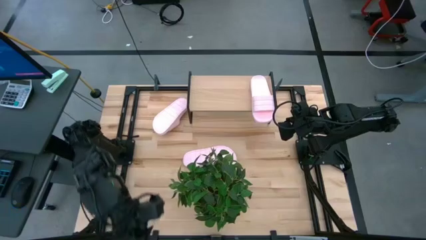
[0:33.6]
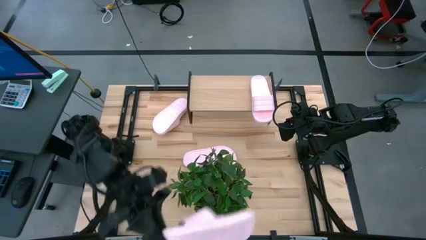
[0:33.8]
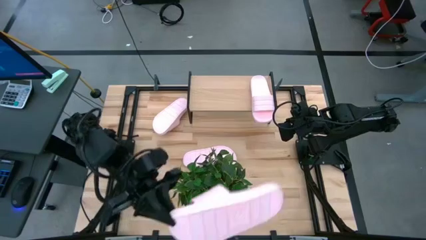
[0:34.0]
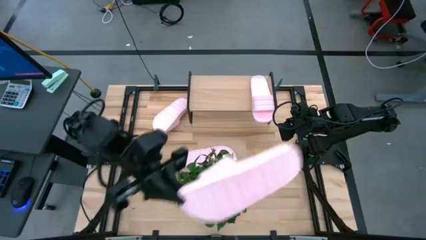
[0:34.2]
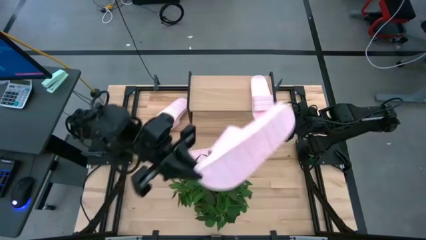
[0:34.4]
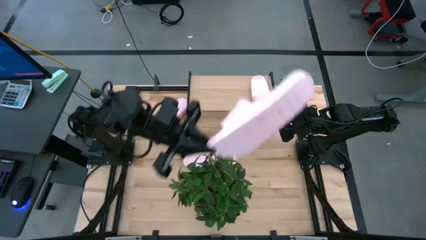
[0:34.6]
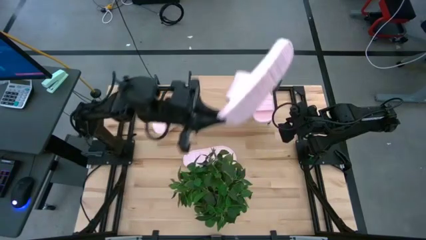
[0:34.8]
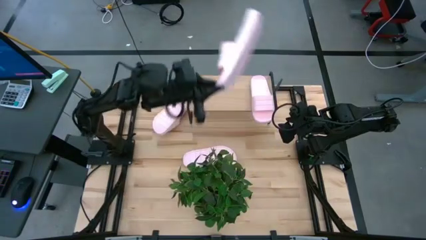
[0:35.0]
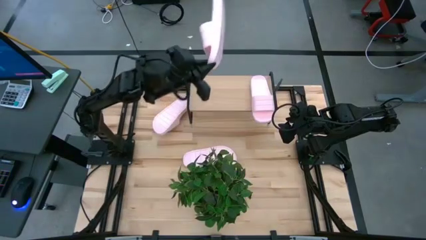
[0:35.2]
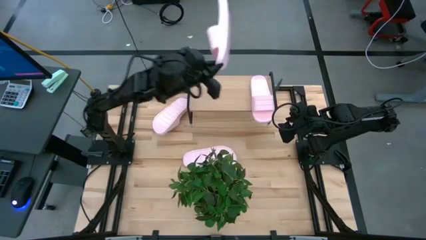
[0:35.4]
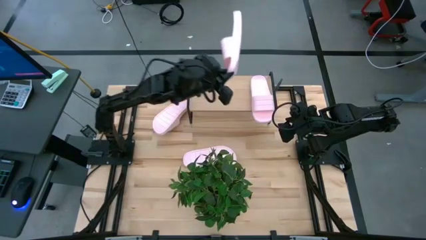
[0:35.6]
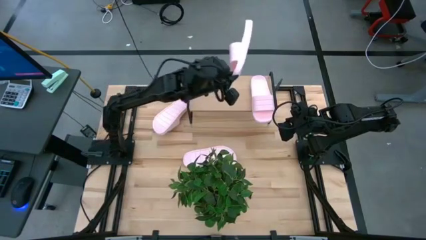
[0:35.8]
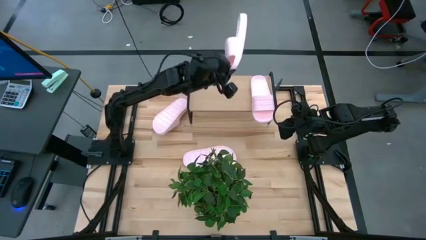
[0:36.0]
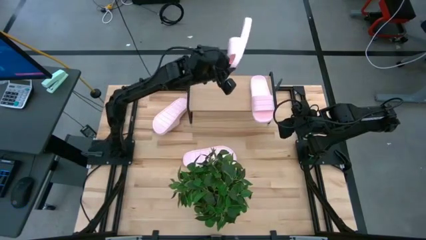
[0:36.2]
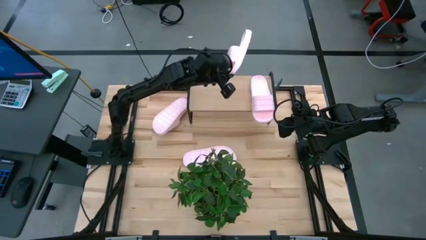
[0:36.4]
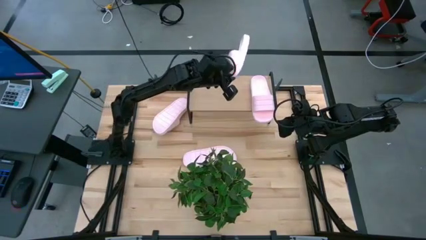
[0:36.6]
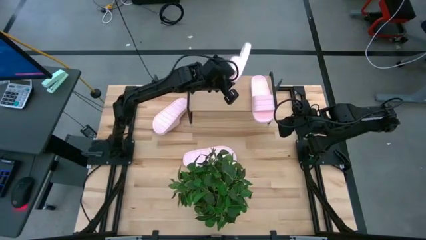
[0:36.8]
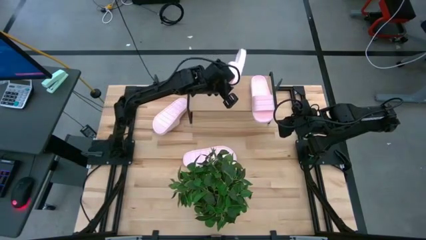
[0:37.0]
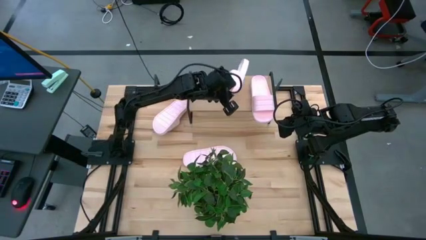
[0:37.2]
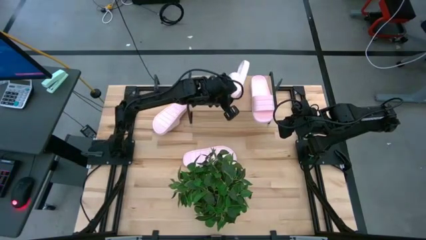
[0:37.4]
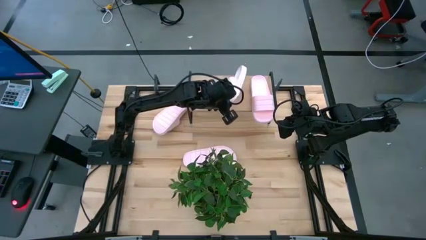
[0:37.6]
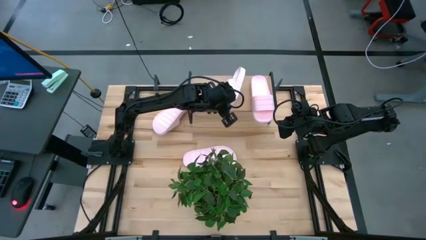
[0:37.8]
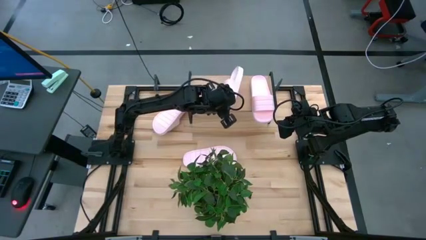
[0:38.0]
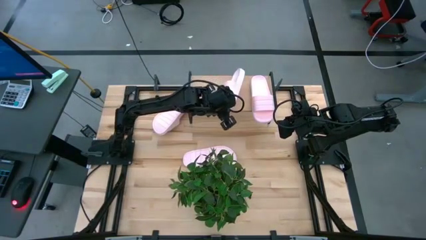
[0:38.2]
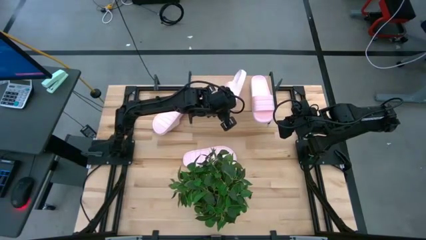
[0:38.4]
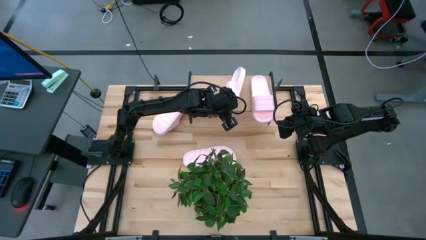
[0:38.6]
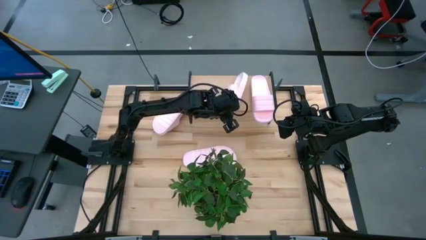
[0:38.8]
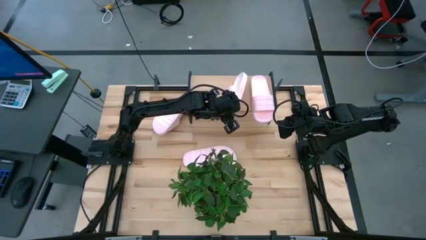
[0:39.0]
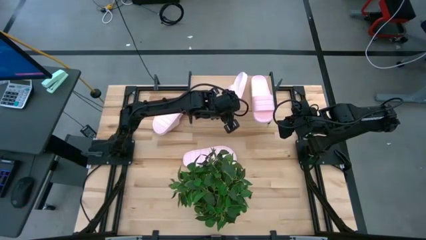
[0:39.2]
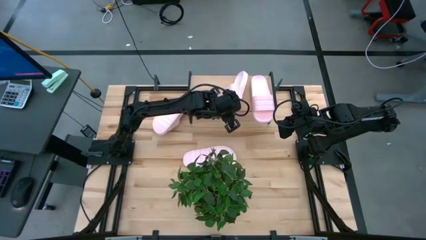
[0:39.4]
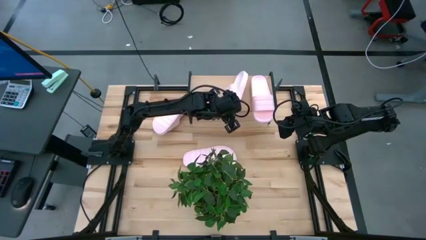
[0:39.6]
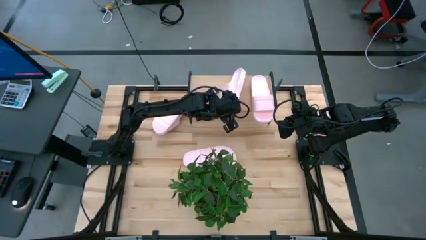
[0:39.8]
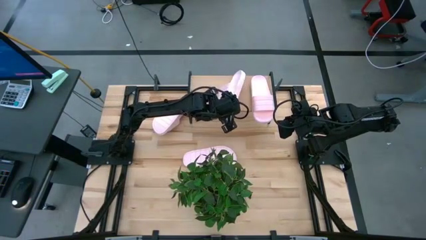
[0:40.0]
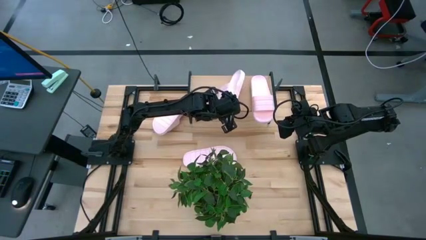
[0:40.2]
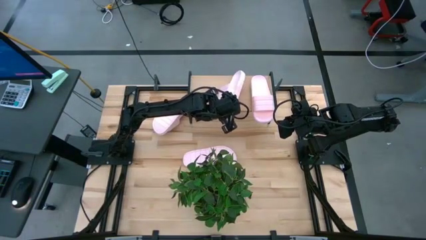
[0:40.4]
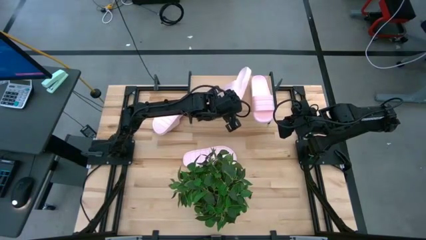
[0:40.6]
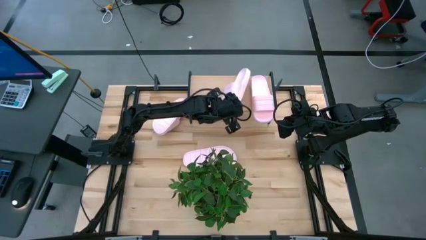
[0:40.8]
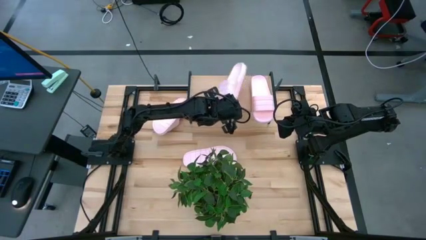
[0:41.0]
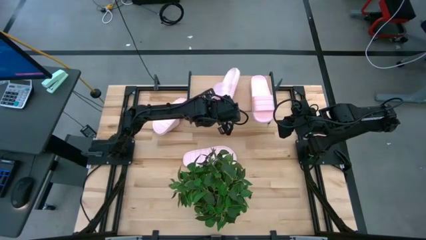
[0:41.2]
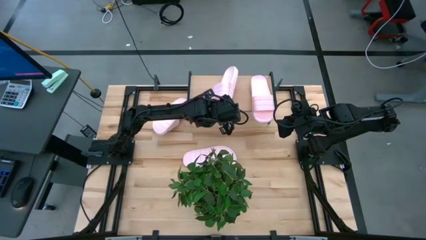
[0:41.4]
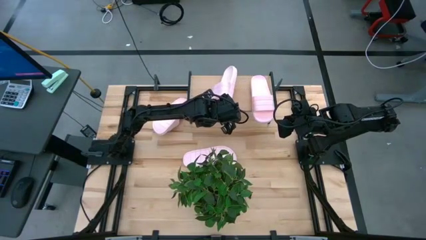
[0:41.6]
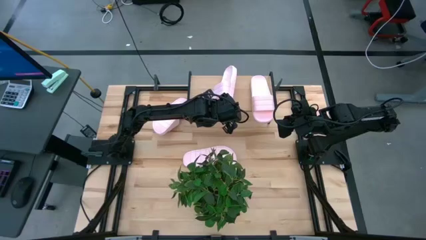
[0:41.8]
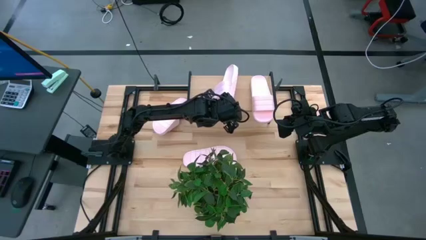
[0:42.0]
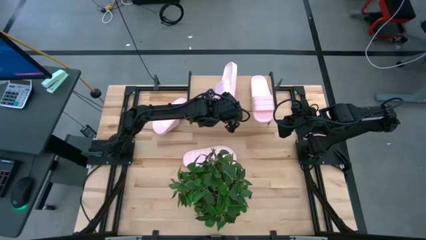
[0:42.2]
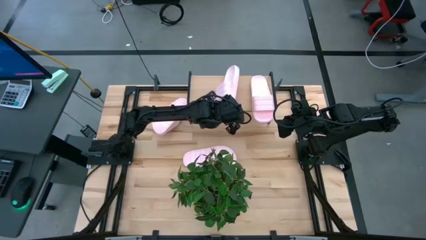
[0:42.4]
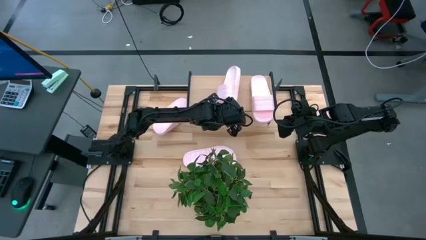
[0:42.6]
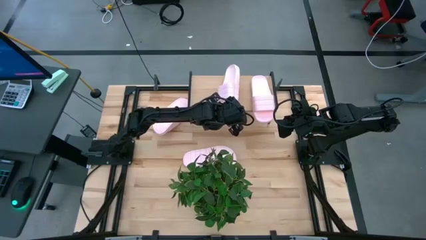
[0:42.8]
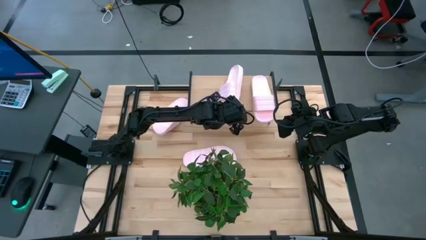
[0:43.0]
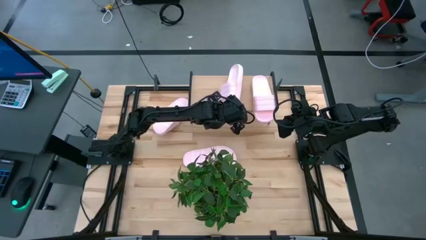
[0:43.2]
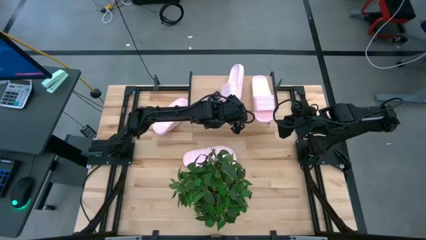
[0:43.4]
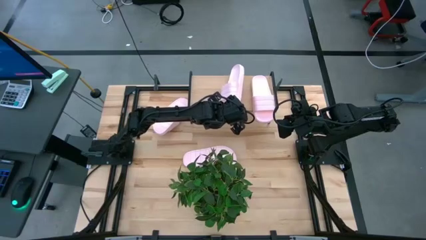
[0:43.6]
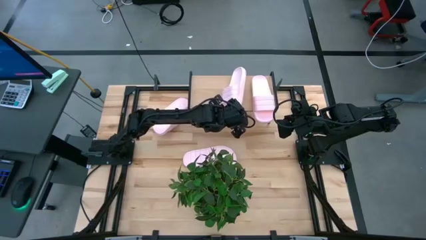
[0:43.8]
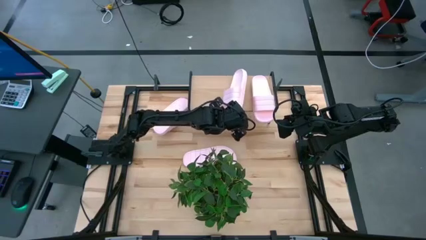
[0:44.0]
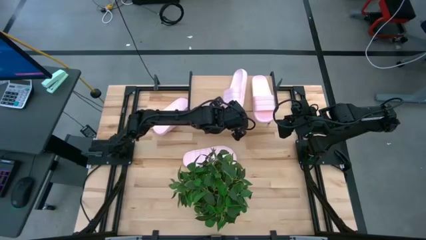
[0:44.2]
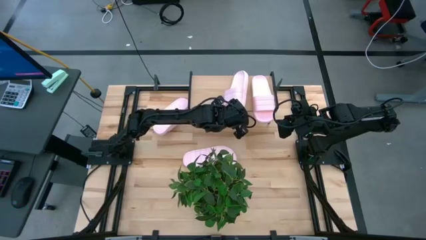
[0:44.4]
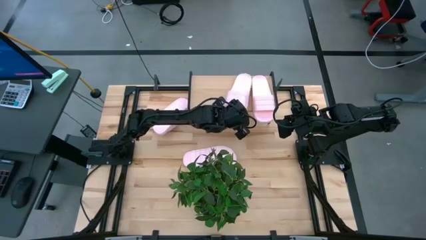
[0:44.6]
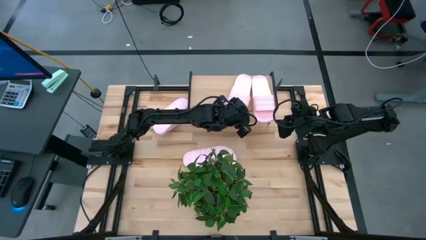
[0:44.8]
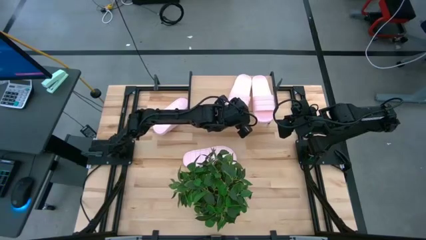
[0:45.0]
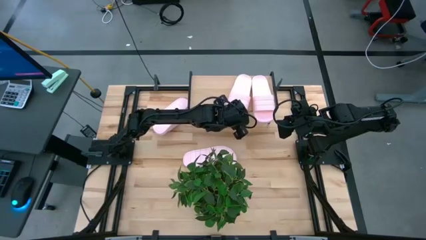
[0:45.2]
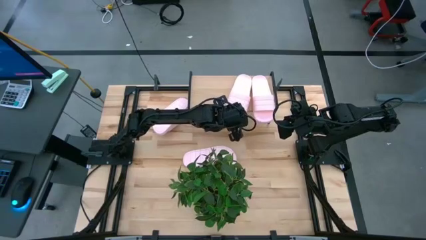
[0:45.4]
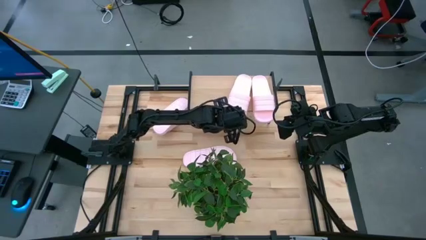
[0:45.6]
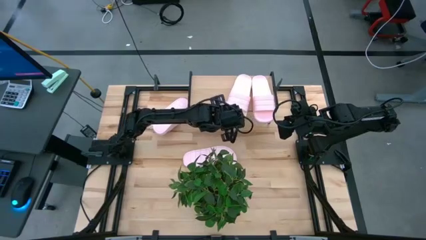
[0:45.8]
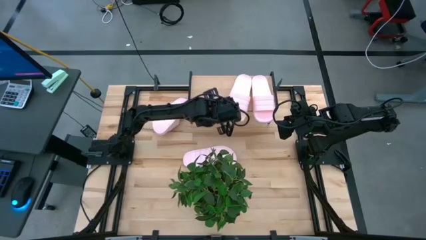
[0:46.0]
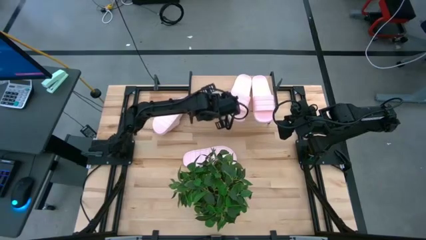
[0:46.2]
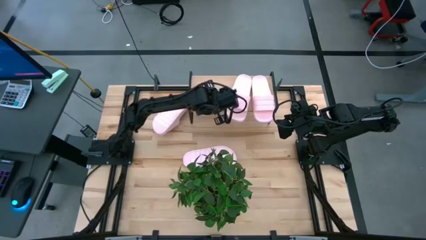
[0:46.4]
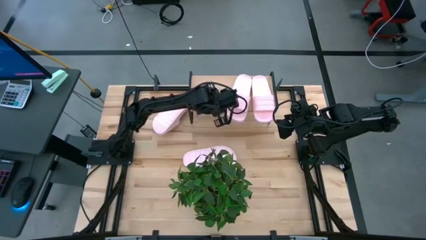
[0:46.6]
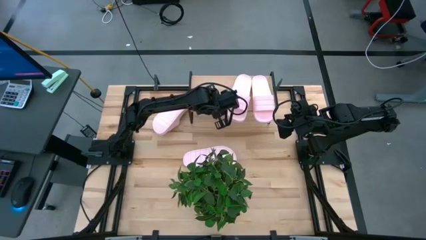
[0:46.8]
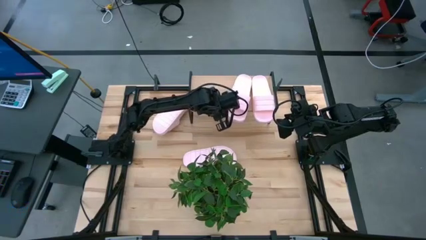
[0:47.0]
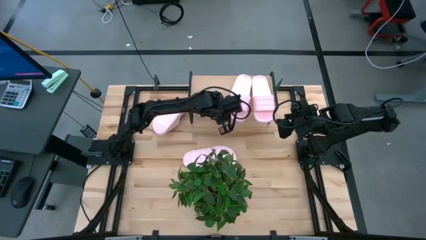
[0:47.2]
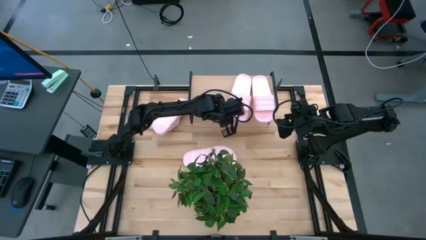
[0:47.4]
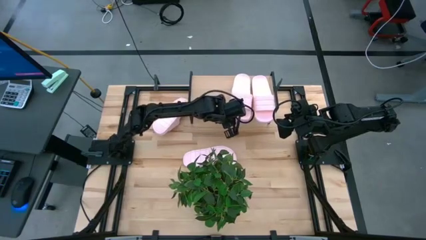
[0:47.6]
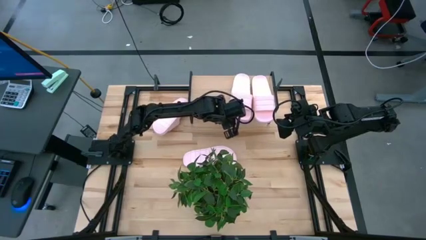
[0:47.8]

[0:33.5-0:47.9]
Task: Pick and place slides into the shelf
Put the bottom left slide on the shelf
